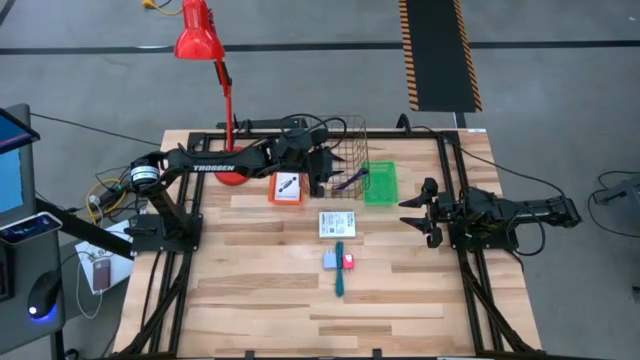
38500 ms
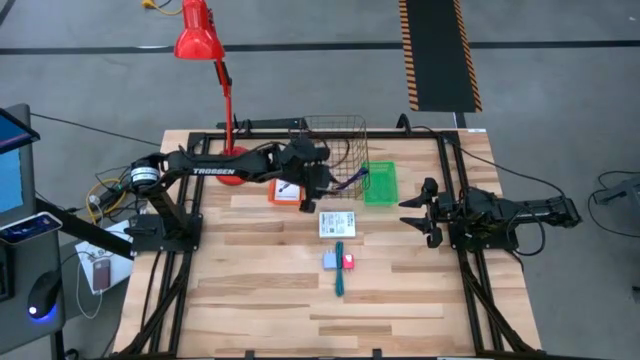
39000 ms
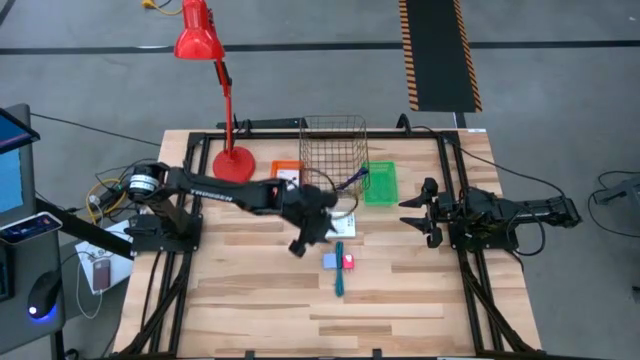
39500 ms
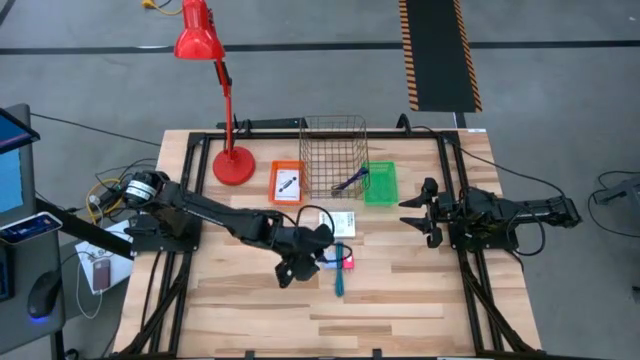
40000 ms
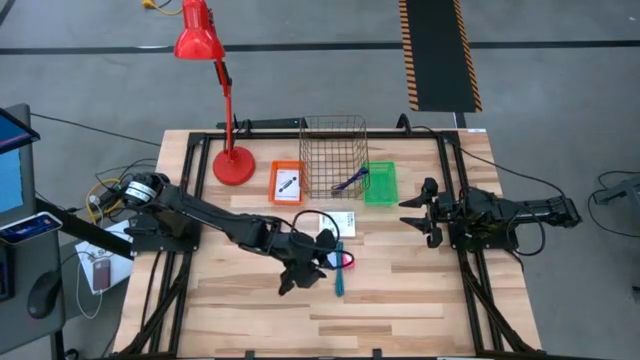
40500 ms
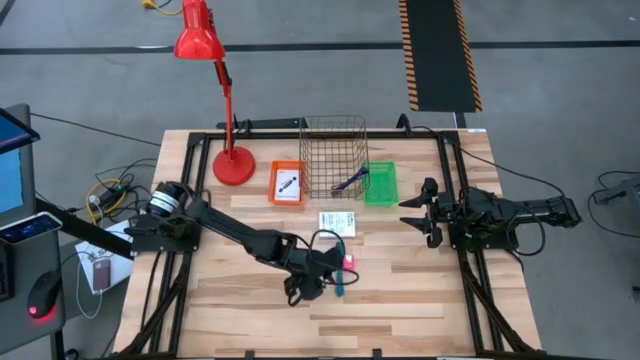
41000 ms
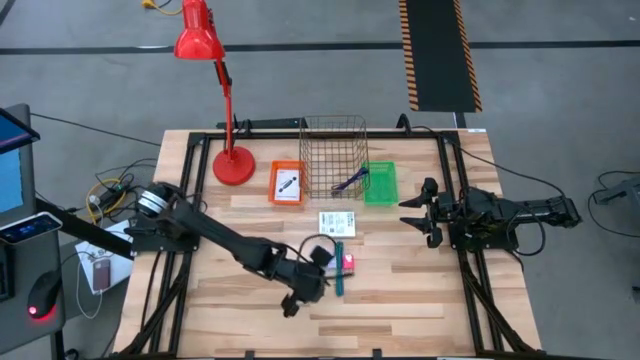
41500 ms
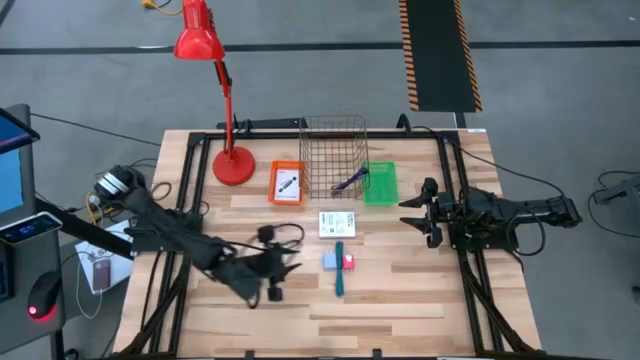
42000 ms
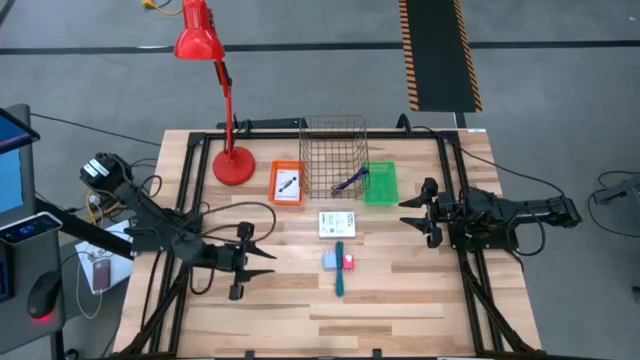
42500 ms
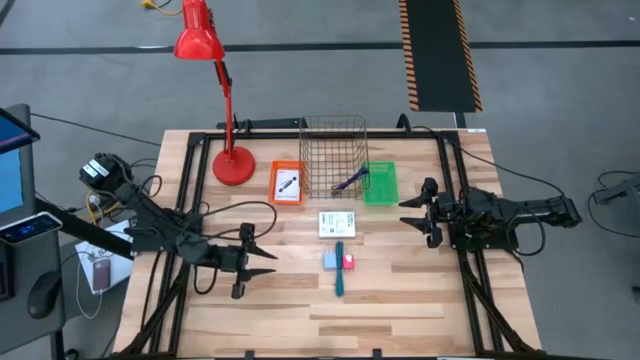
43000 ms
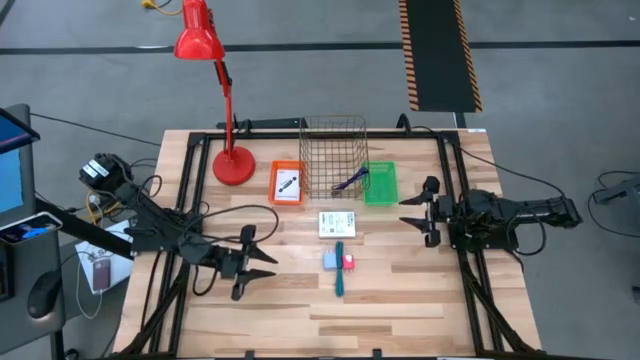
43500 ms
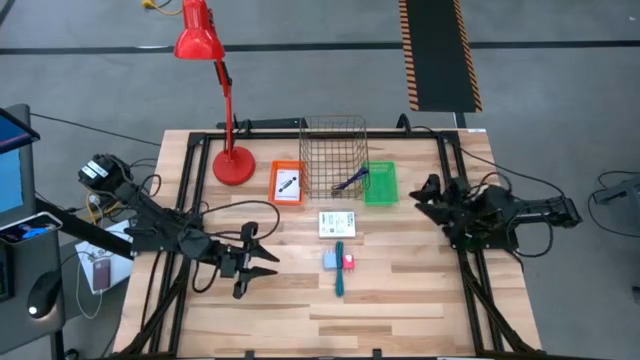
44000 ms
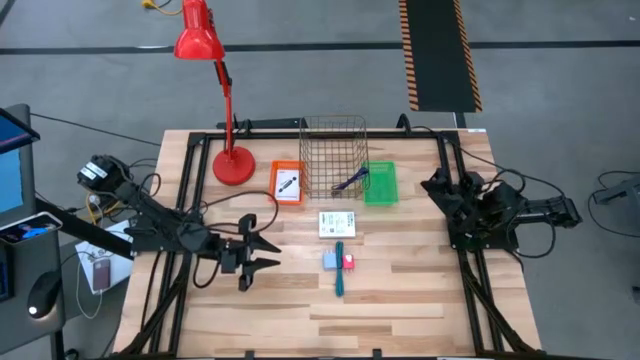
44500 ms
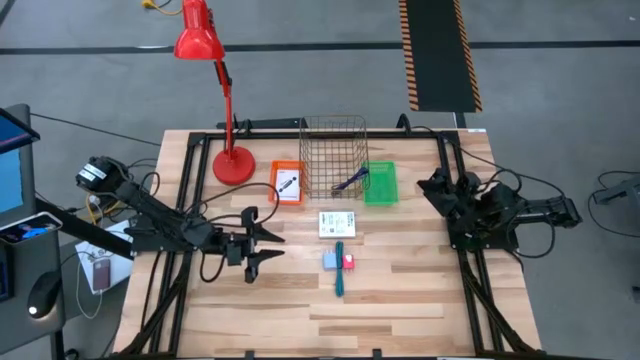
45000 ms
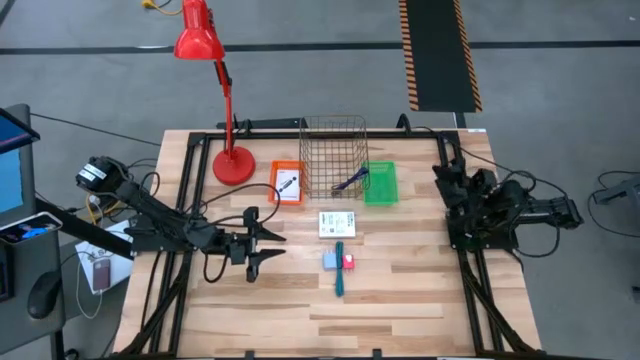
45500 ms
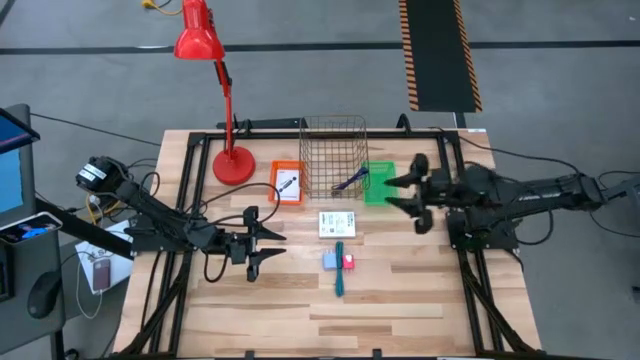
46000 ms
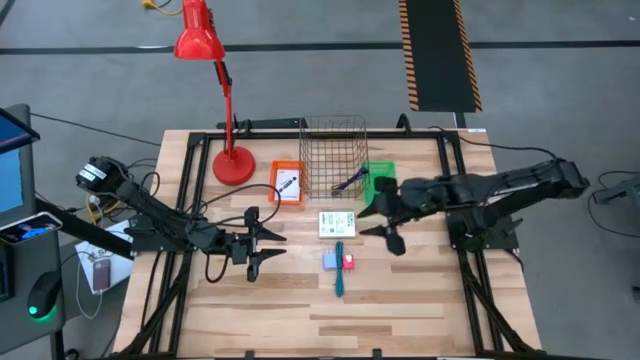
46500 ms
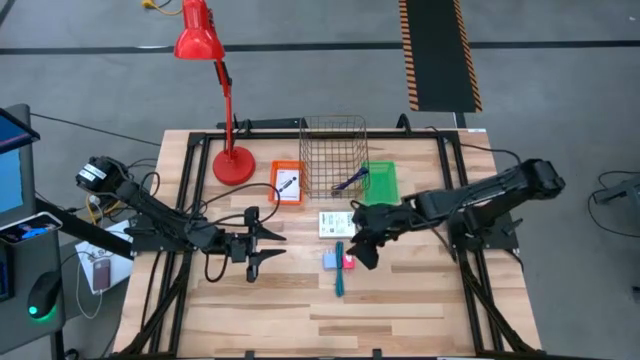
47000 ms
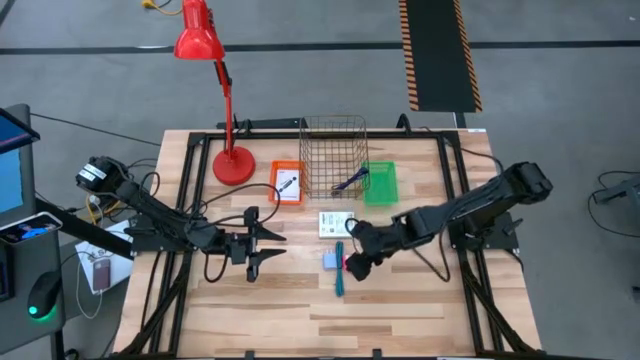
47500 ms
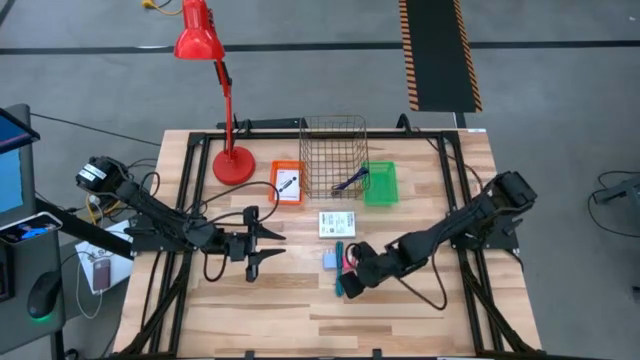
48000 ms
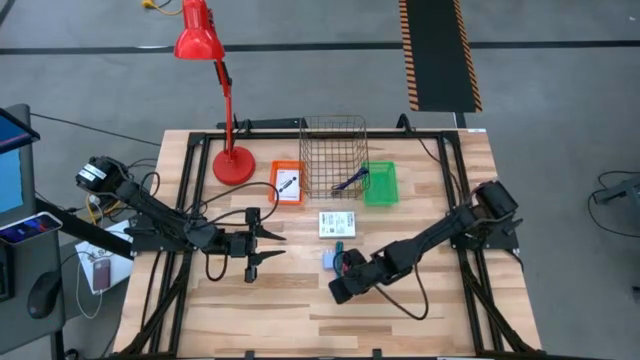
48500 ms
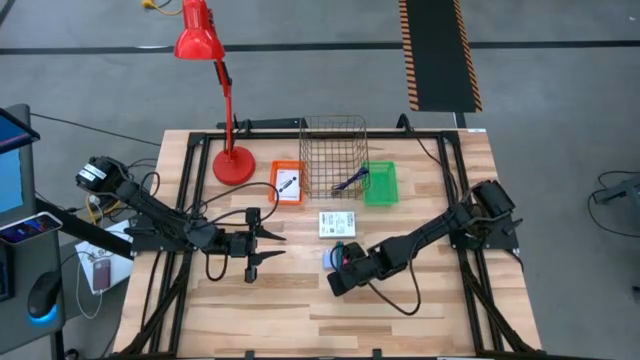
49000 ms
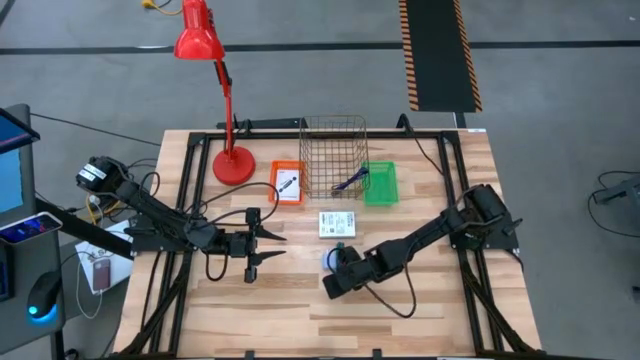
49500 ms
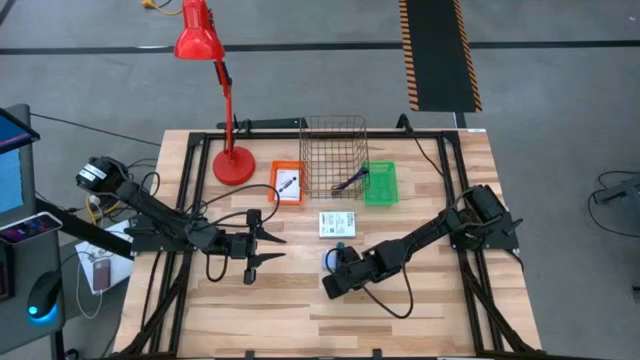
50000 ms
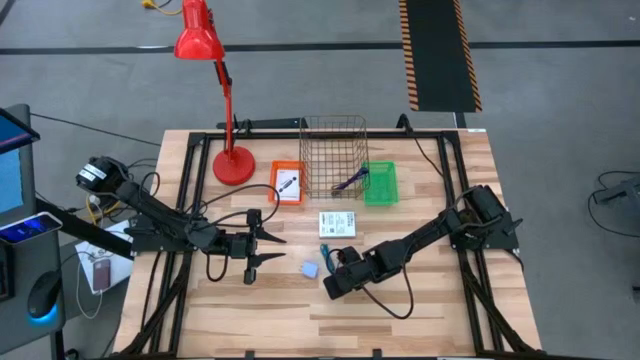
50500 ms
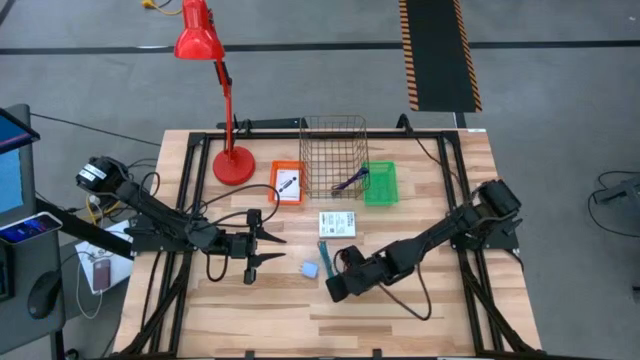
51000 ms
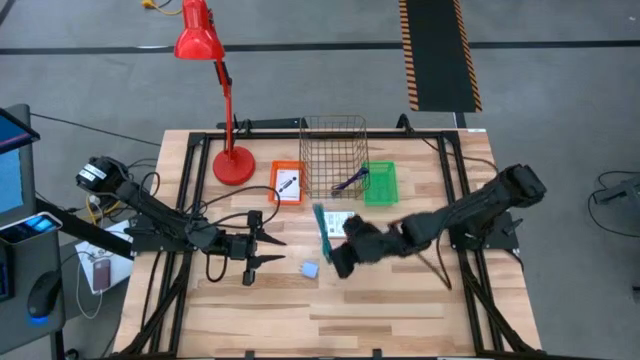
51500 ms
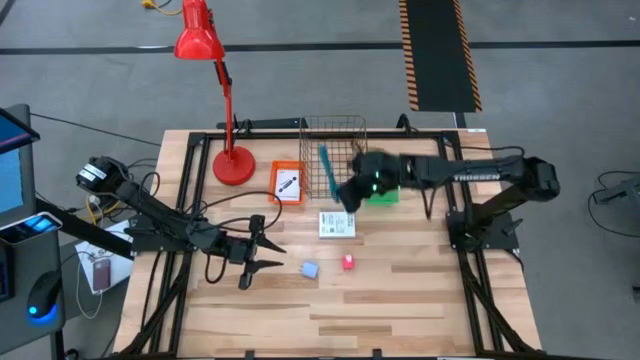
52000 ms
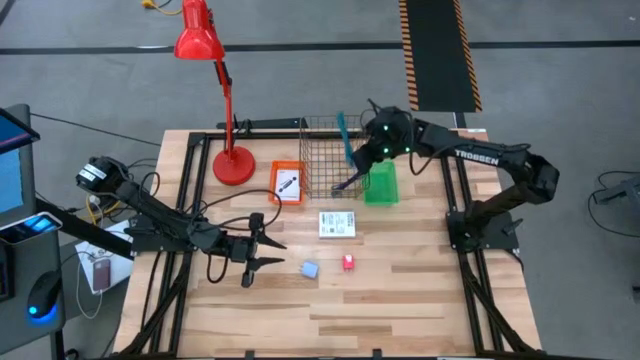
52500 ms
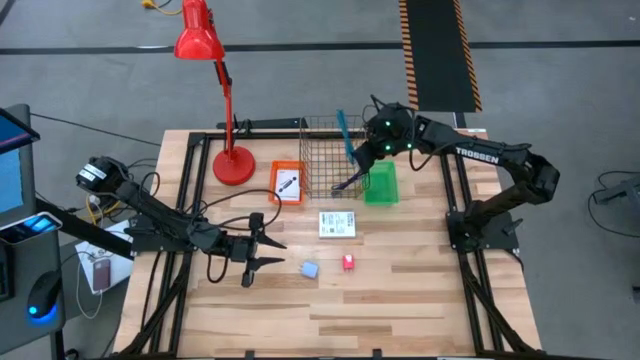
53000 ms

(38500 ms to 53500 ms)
Task: Pick and place items into bin
Put the light blue charger cable into the wire basket

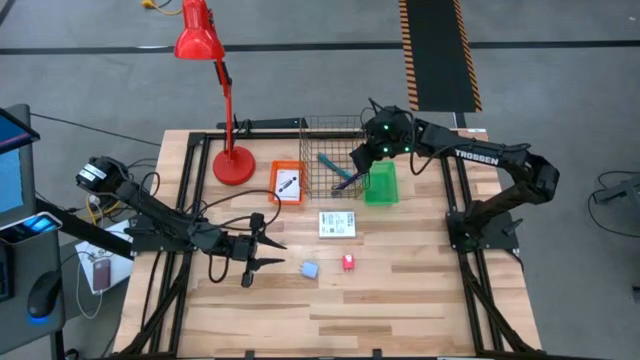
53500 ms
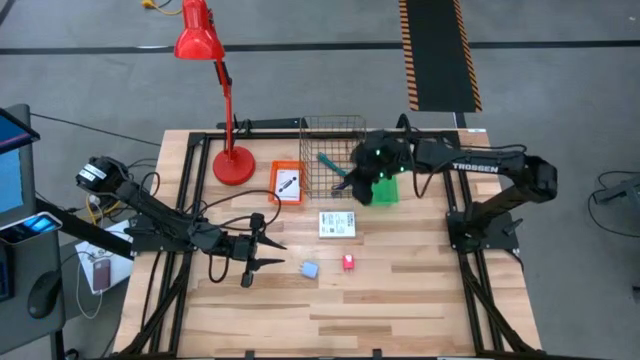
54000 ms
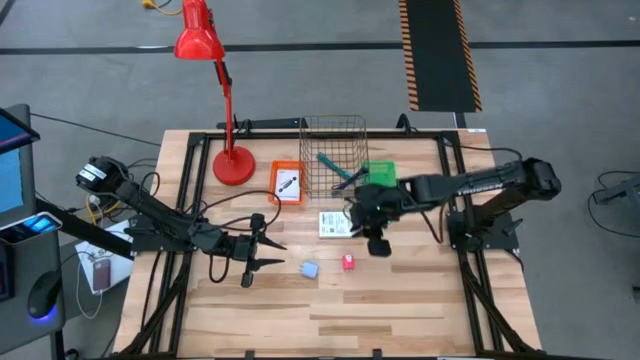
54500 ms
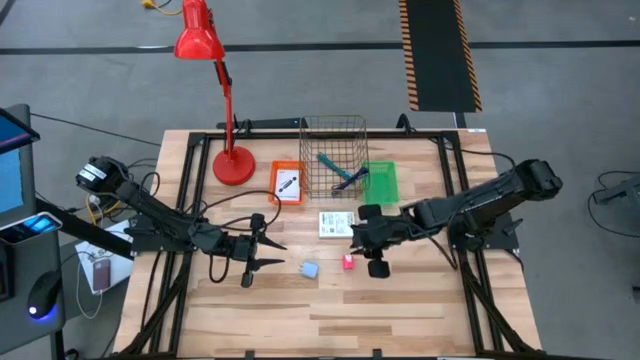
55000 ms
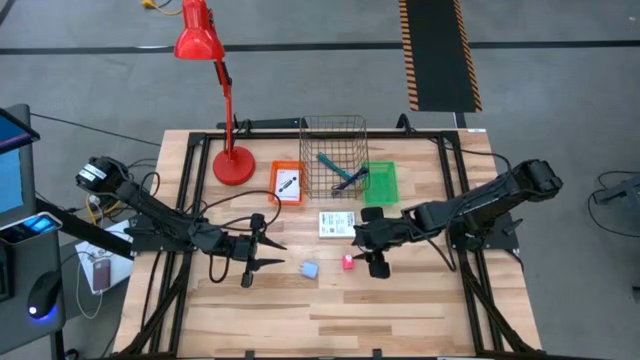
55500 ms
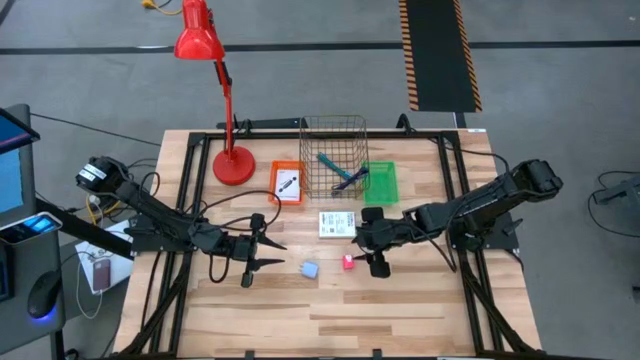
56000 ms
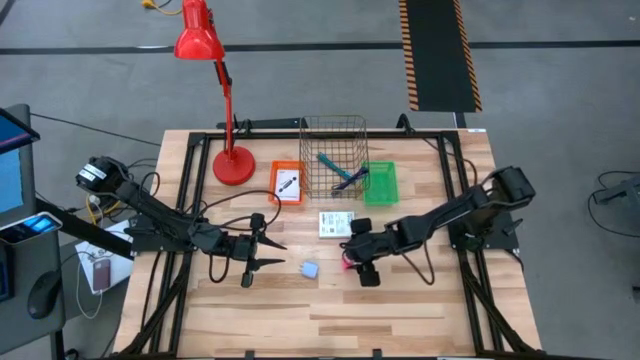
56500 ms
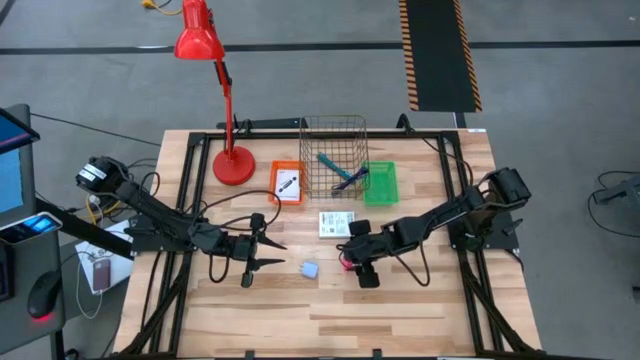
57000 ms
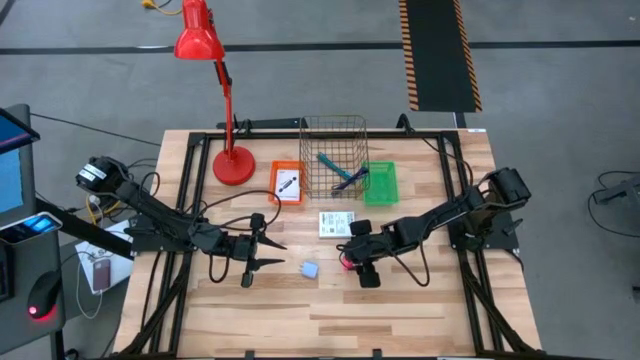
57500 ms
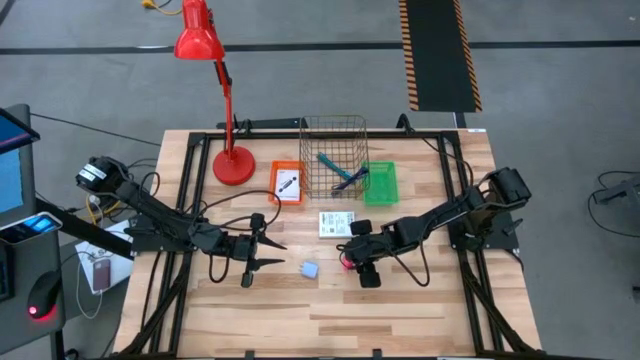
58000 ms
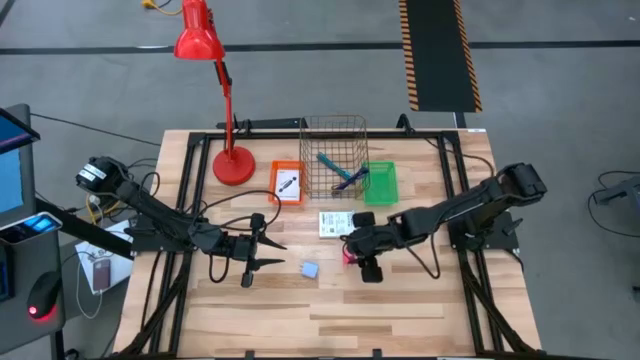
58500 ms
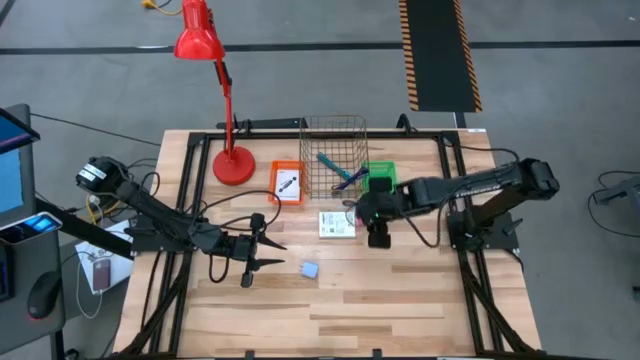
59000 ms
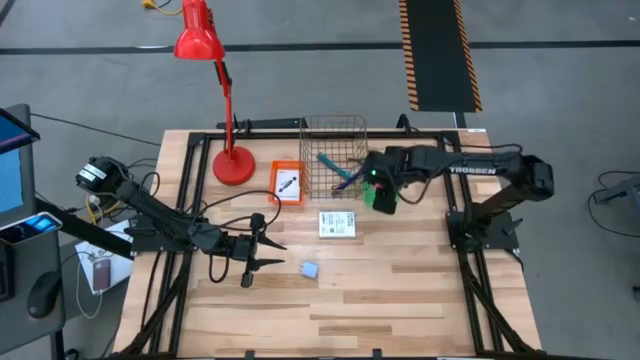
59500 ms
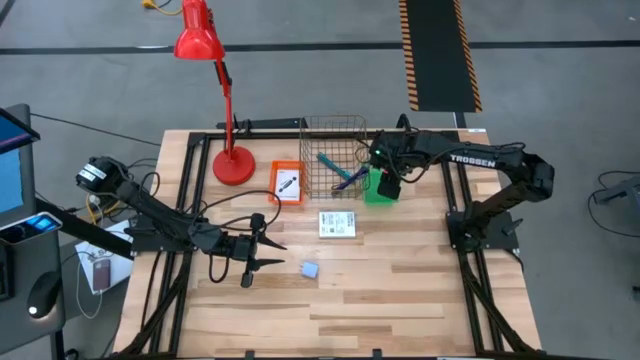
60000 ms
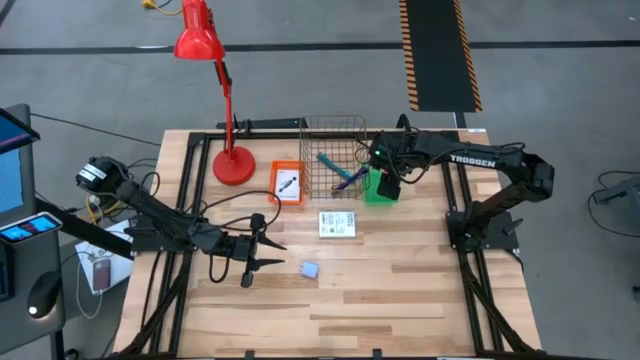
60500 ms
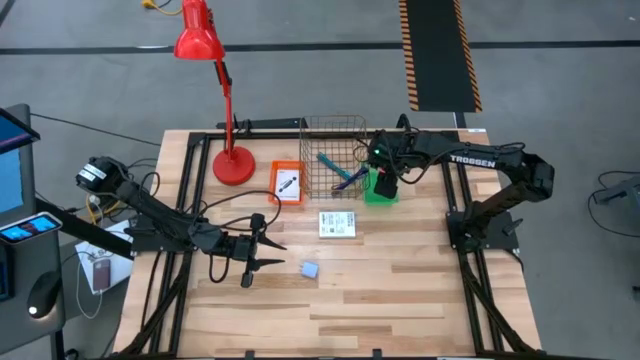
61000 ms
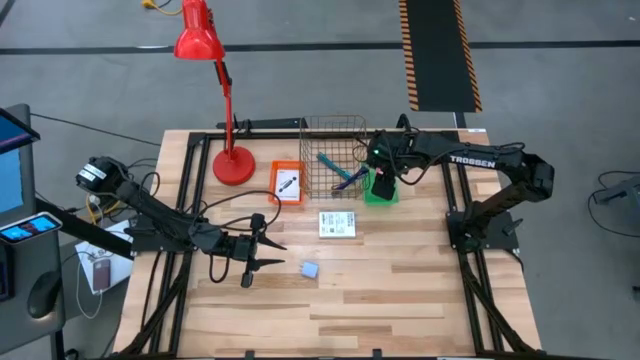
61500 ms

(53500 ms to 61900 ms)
Put the pink charger adapter into the green basket
